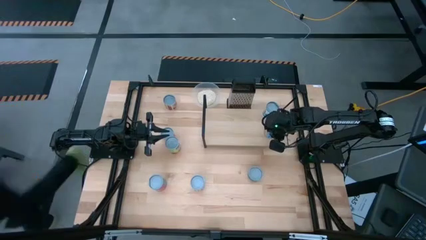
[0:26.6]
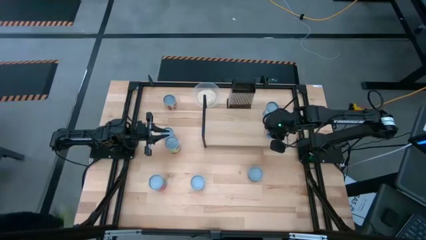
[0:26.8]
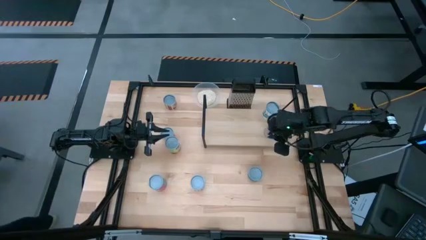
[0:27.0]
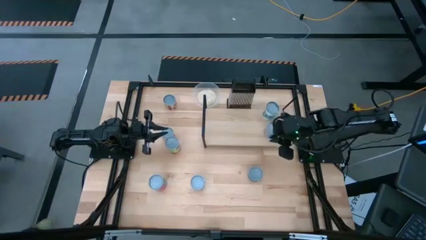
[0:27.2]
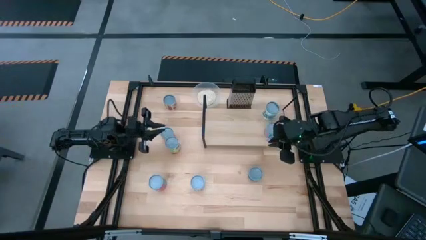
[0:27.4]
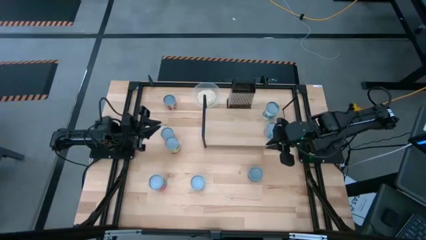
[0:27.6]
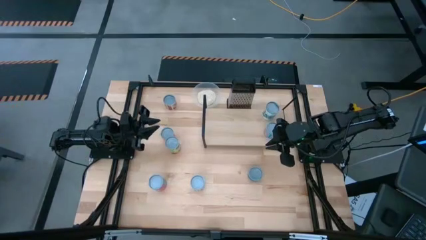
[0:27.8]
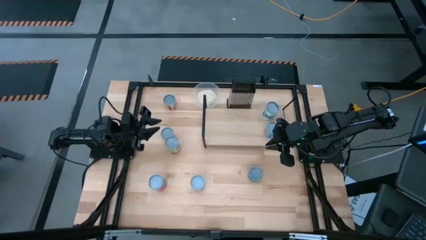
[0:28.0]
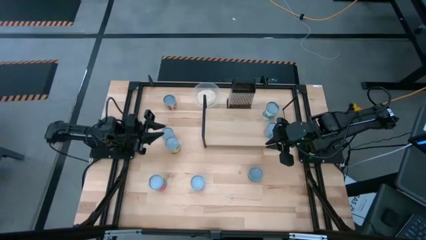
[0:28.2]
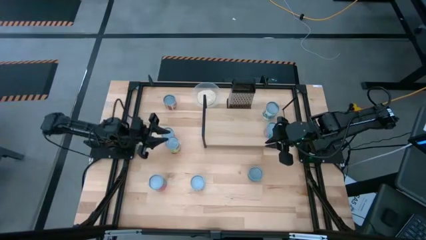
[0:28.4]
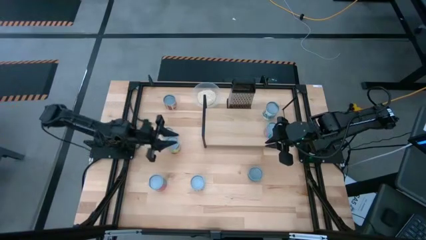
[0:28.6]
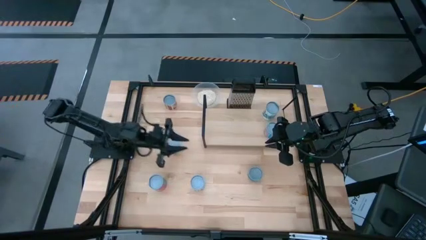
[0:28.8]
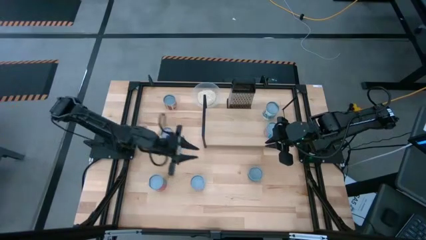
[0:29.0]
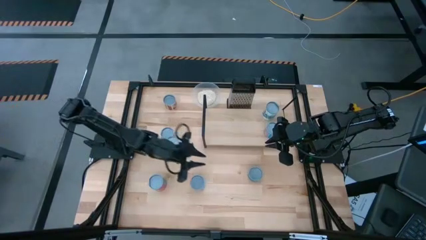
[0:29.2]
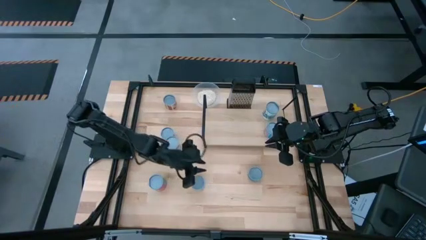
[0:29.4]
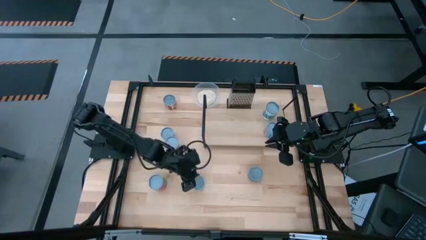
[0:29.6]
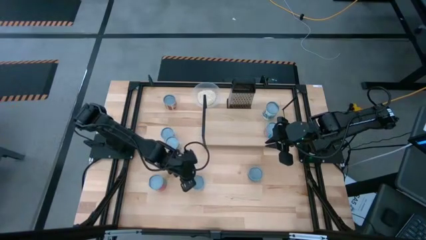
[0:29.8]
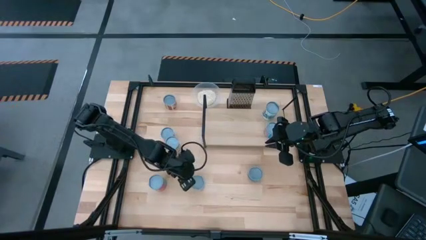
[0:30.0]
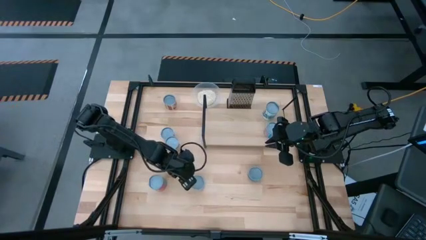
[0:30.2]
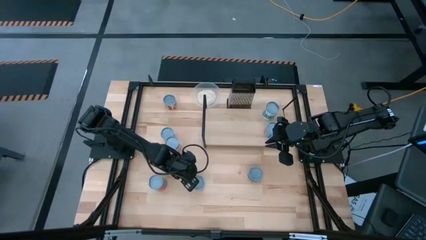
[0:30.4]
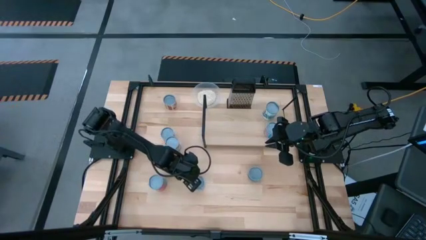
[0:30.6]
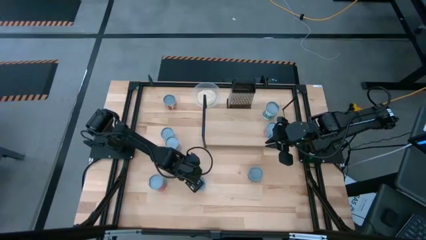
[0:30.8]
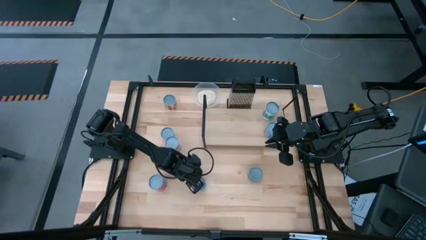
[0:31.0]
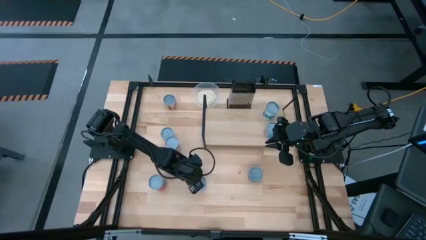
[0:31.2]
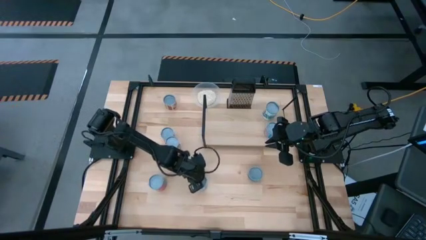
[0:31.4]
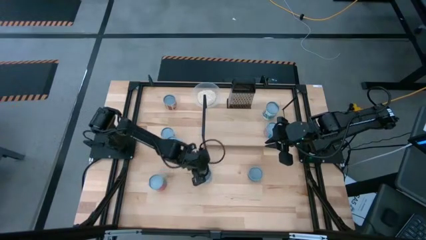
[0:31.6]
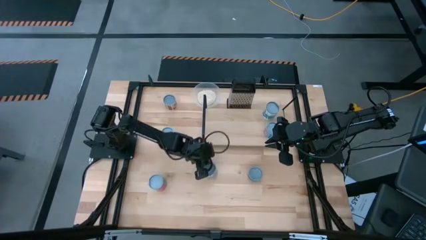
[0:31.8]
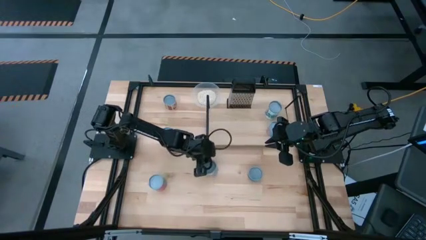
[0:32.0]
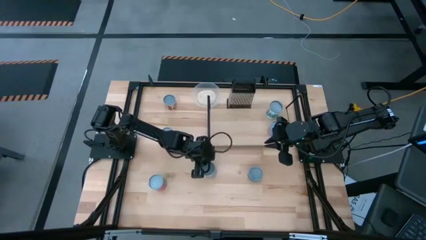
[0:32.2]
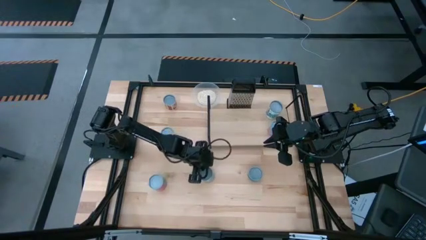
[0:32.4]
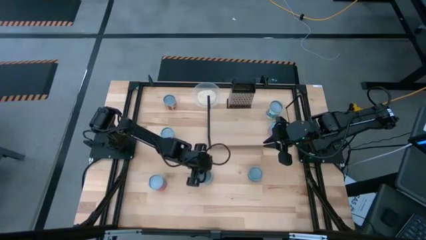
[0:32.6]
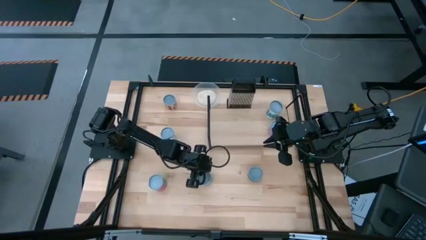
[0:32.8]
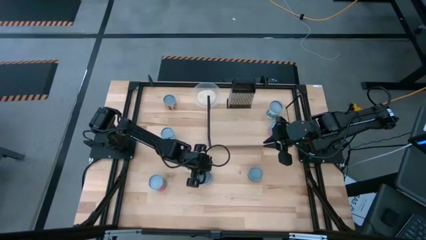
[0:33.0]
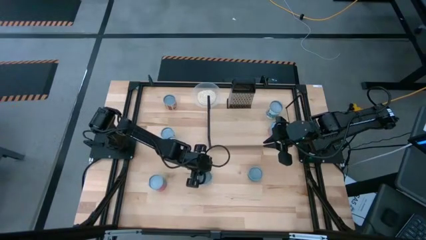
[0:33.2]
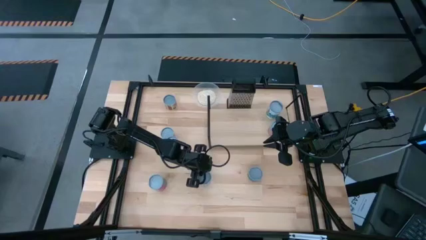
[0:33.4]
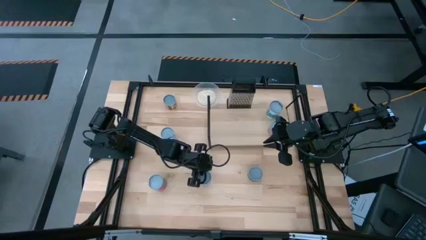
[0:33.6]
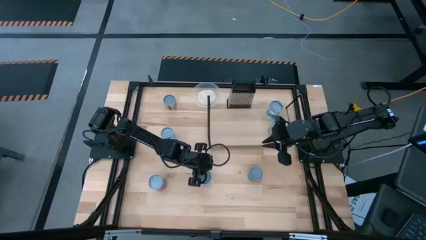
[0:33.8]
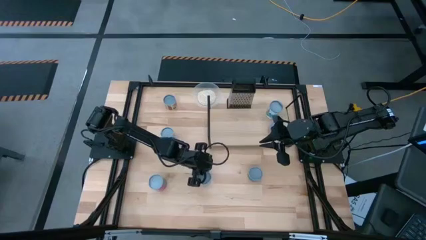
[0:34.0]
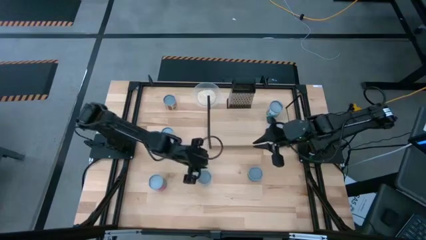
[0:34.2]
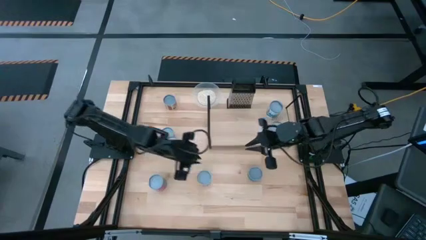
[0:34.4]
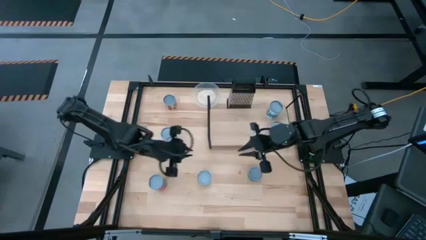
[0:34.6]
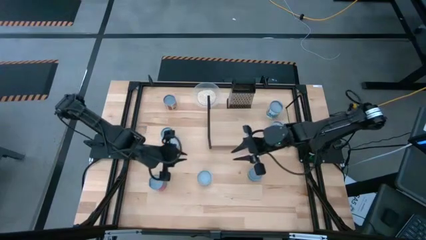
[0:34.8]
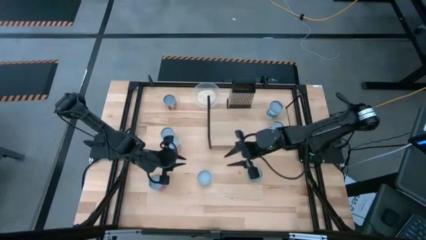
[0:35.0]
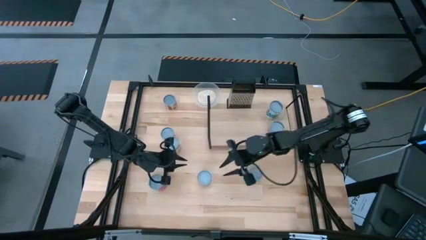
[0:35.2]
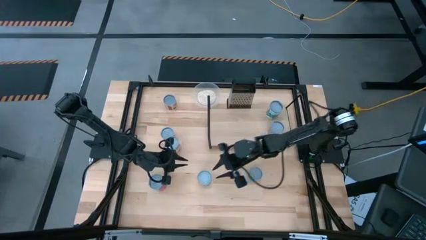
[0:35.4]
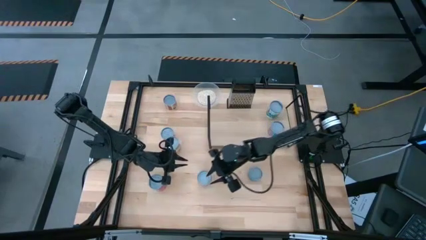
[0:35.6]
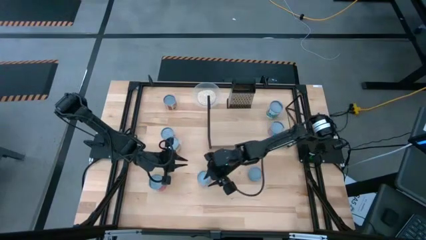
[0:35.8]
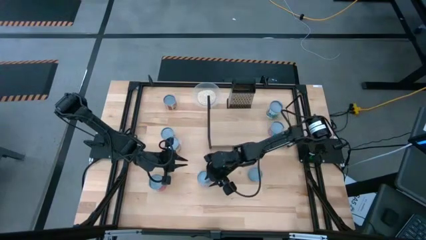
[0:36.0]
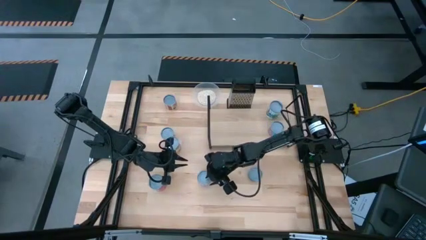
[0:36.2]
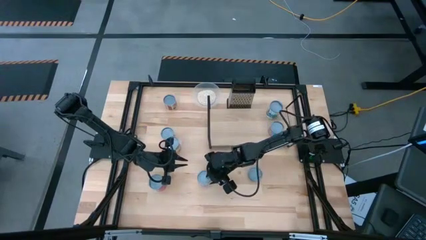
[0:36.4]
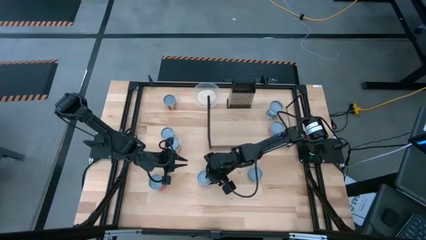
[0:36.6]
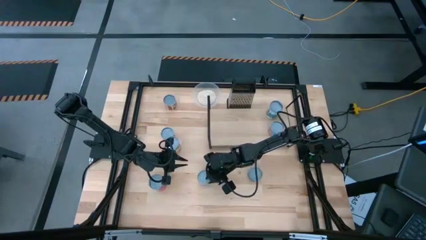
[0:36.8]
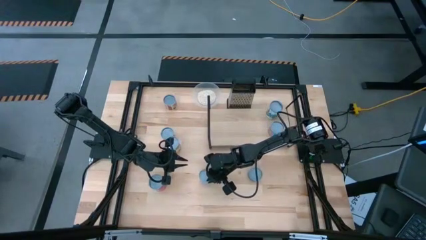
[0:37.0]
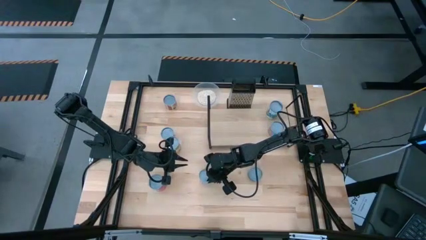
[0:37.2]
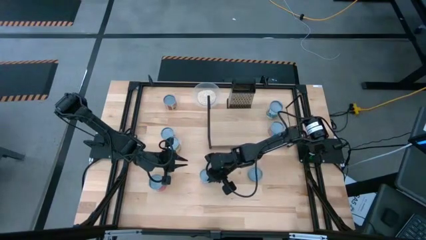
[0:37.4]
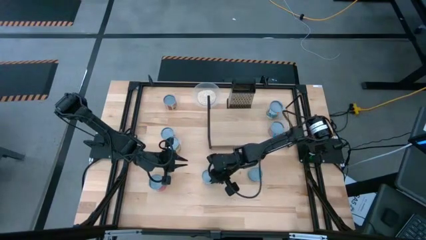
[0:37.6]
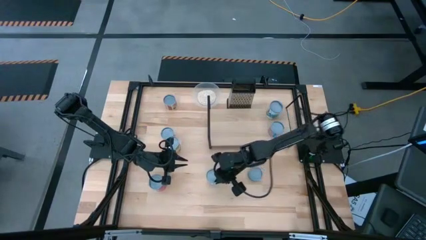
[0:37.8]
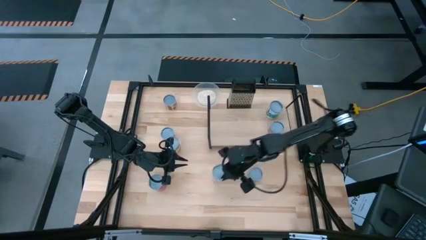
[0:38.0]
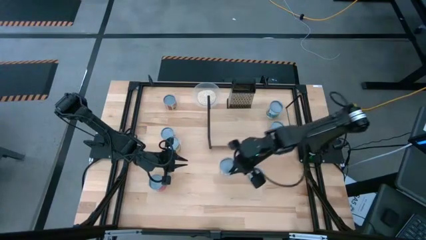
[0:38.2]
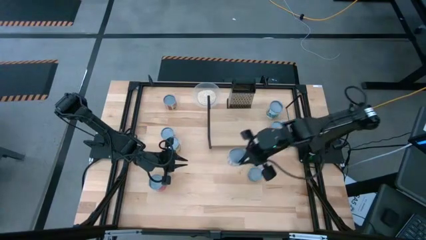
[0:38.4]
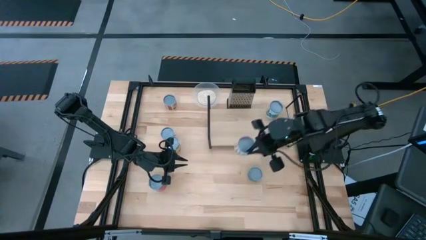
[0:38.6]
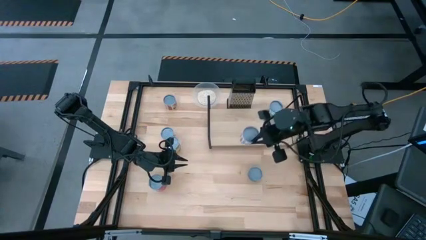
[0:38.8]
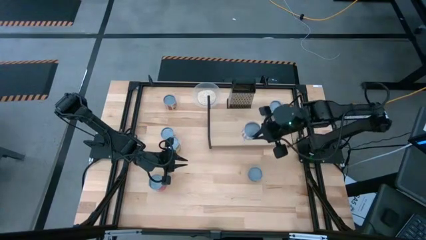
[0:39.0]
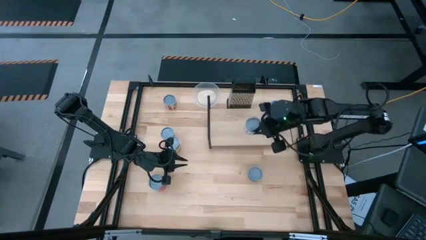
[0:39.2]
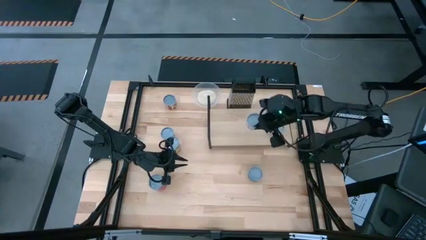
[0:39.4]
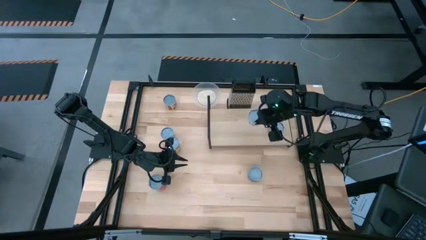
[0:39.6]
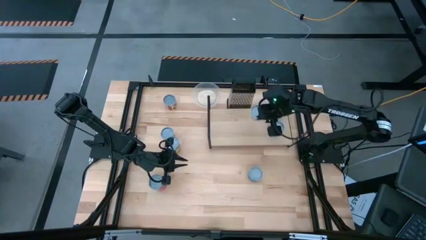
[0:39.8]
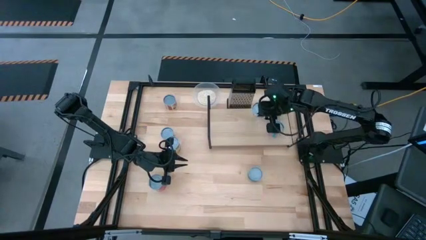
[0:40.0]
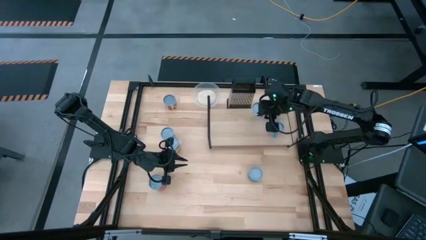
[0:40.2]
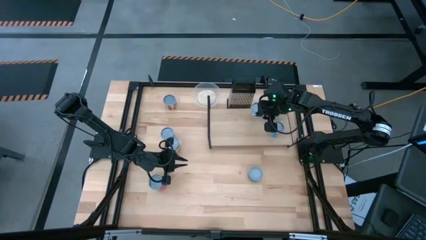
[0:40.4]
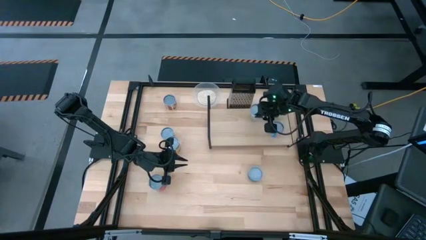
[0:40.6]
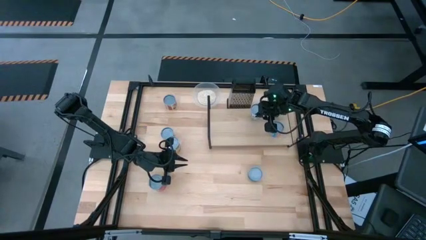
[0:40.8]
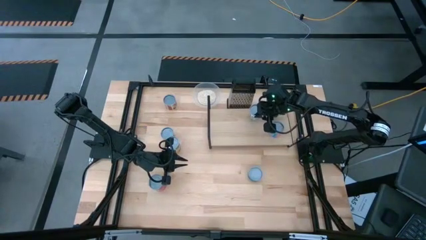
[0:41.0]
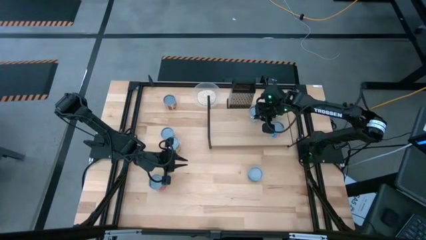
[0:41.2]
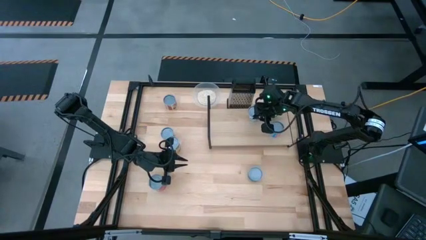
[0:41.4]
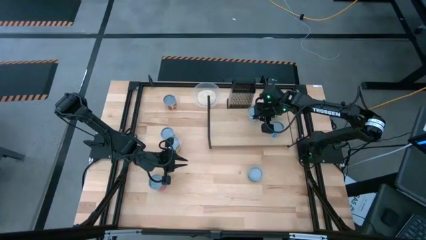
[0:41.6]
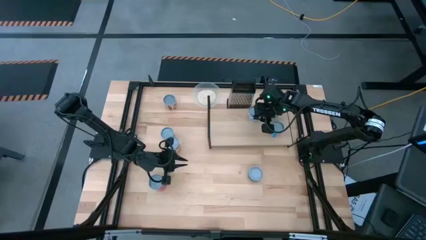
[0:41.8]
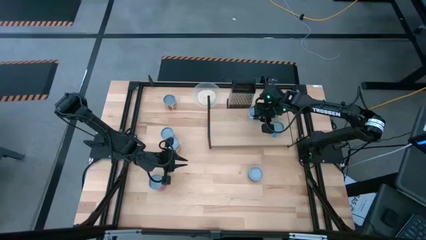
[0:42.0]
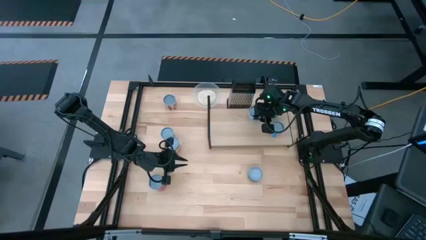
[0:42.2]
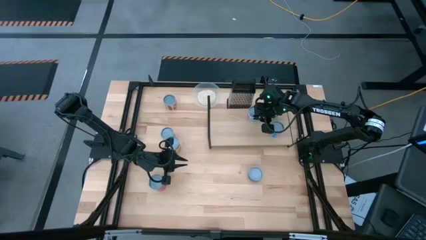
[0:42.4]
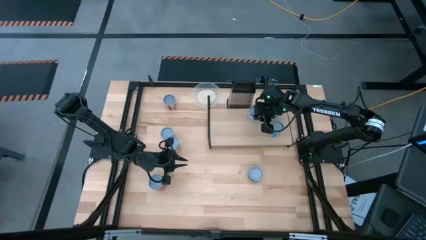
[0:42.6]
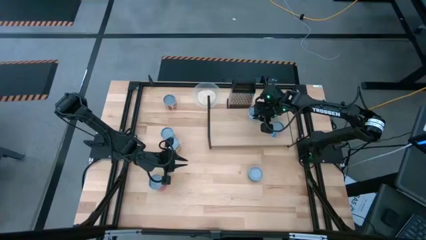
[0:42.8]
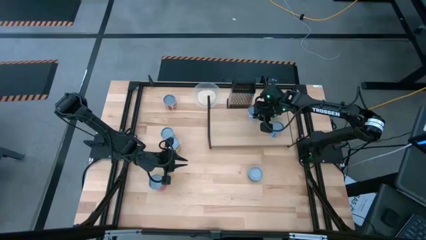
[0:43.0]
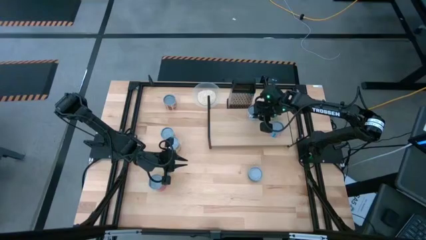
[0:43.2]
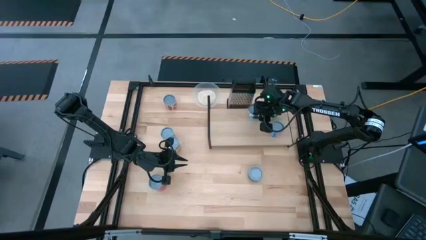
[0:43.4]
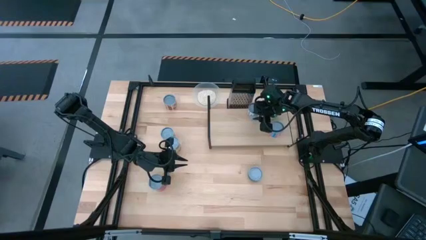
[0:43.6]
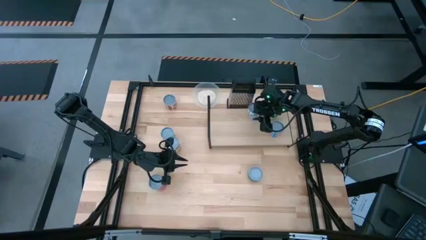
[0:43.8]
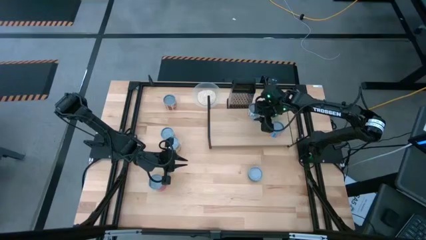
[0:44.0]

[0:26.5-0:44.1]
Task: Pick and place cans onto a shelf
Put the canned fresh sliced carrots on the shelf
